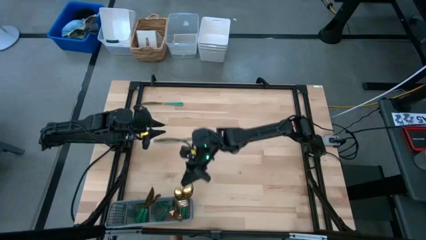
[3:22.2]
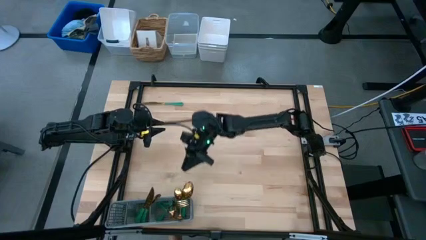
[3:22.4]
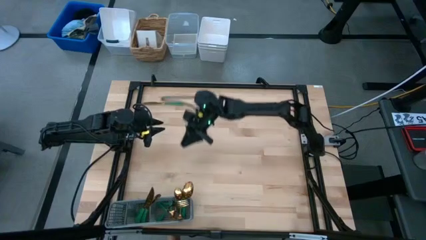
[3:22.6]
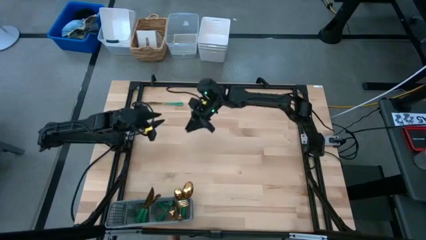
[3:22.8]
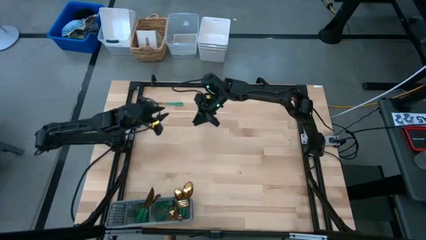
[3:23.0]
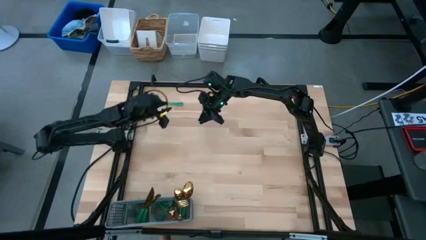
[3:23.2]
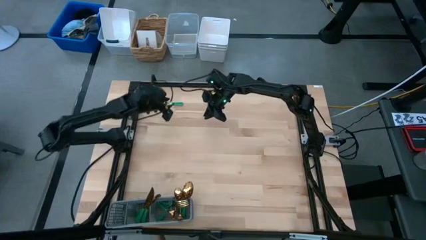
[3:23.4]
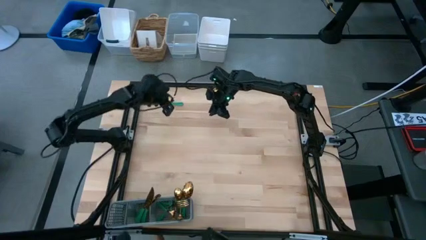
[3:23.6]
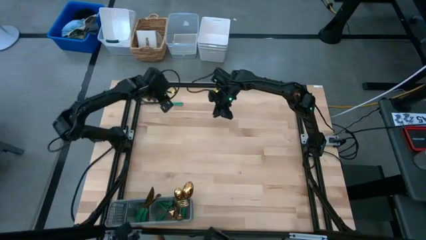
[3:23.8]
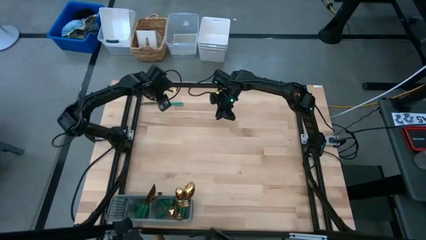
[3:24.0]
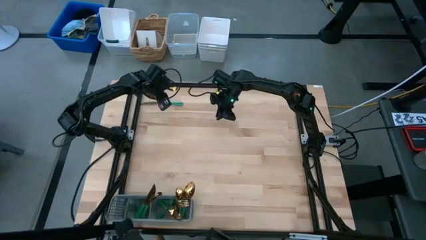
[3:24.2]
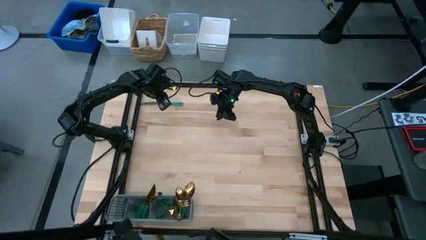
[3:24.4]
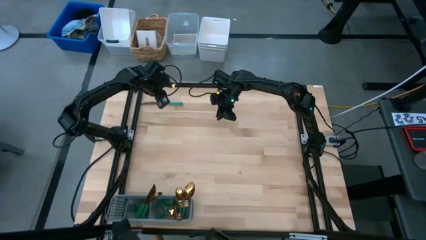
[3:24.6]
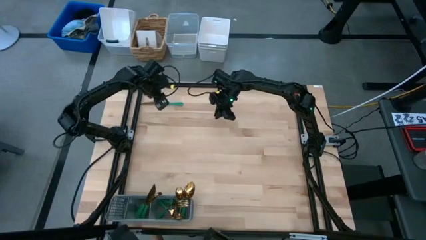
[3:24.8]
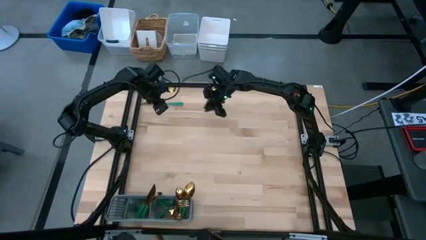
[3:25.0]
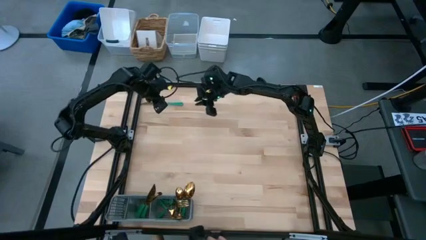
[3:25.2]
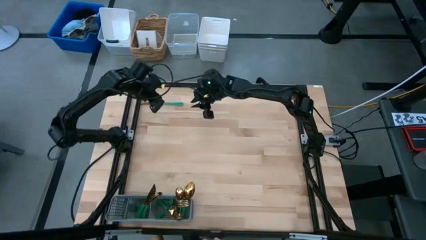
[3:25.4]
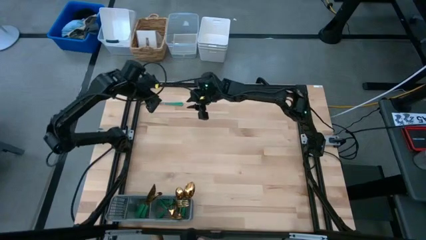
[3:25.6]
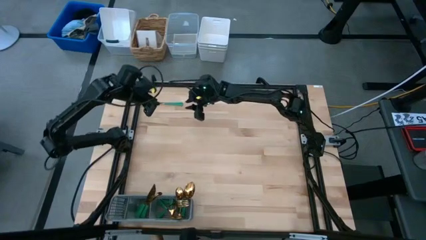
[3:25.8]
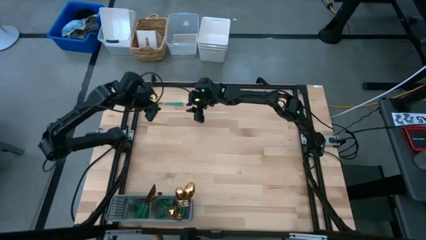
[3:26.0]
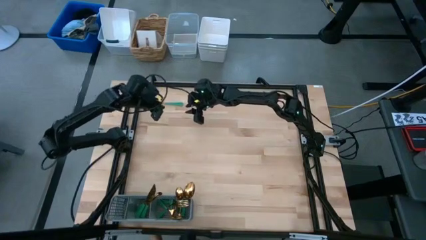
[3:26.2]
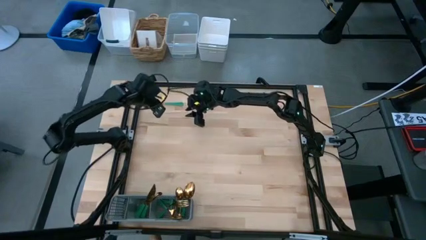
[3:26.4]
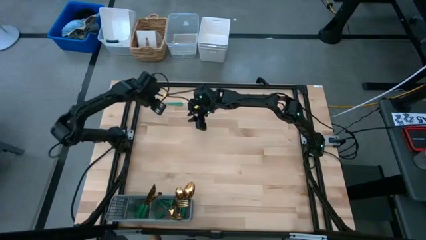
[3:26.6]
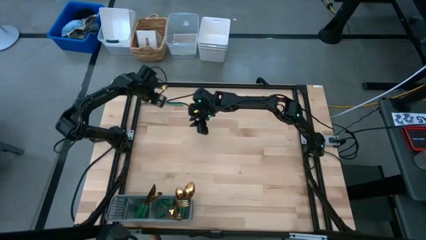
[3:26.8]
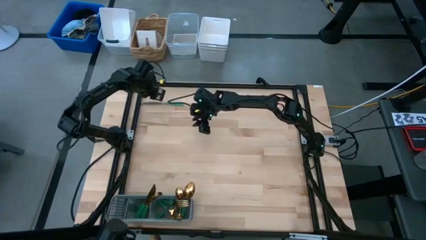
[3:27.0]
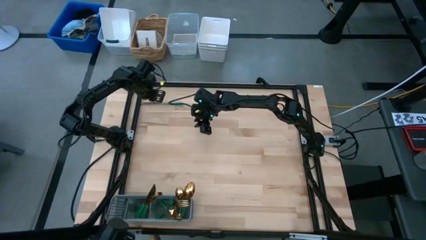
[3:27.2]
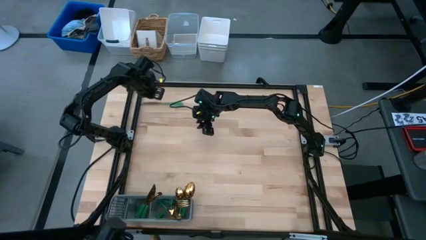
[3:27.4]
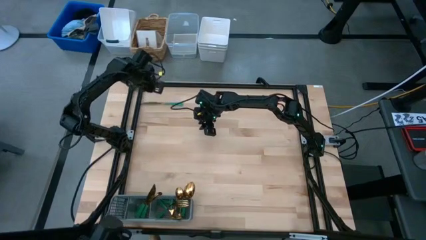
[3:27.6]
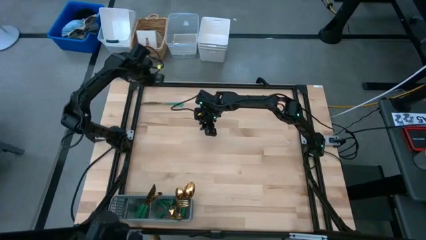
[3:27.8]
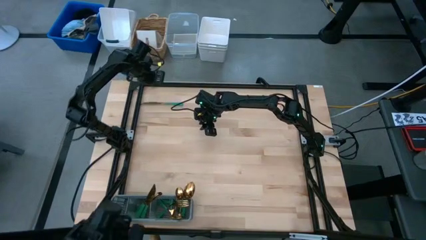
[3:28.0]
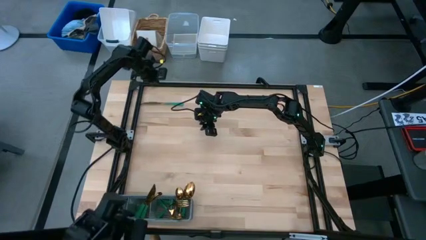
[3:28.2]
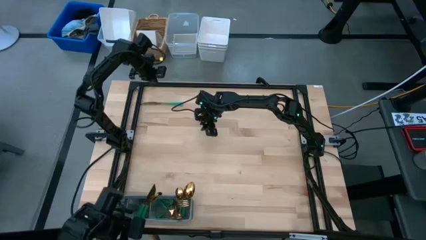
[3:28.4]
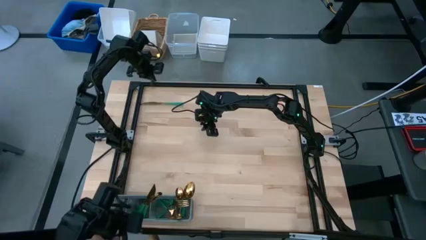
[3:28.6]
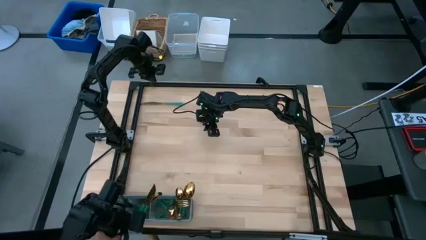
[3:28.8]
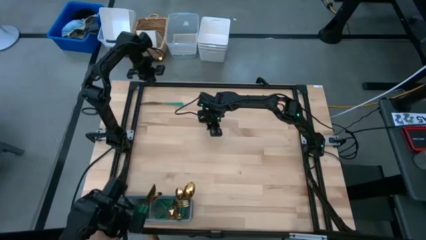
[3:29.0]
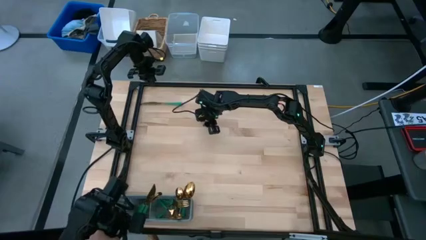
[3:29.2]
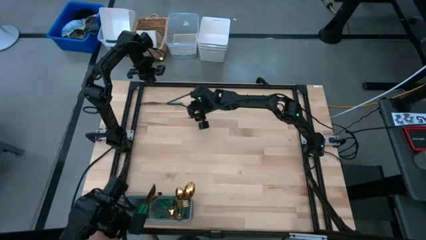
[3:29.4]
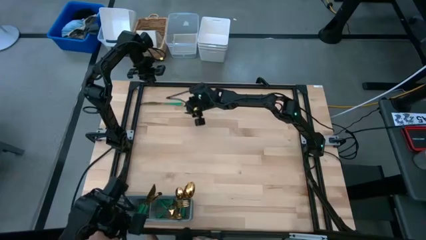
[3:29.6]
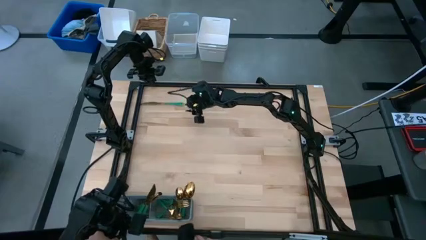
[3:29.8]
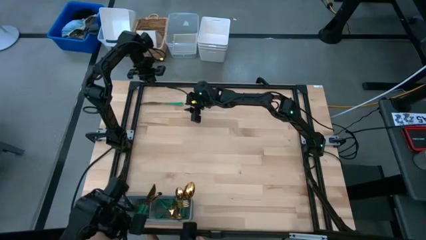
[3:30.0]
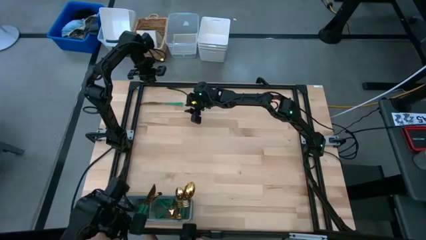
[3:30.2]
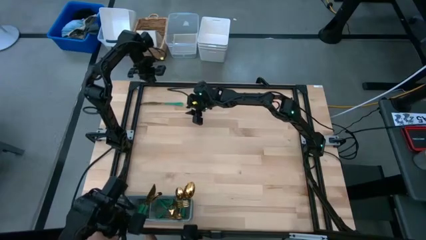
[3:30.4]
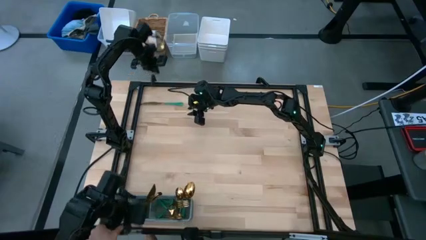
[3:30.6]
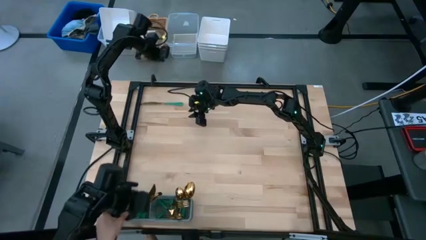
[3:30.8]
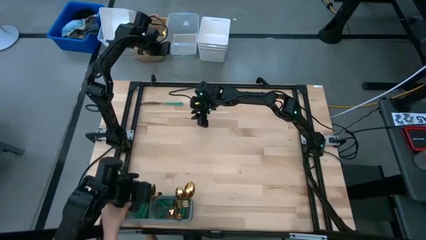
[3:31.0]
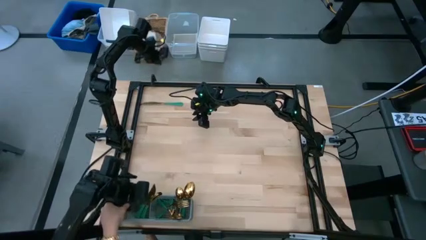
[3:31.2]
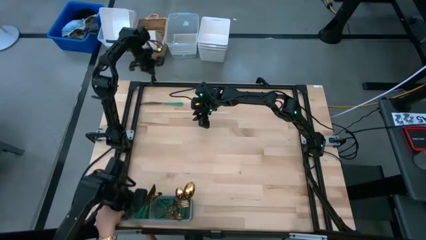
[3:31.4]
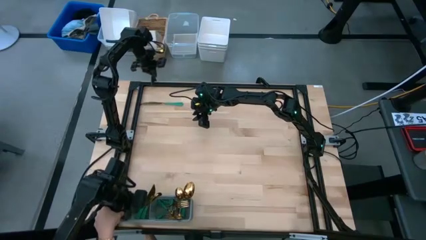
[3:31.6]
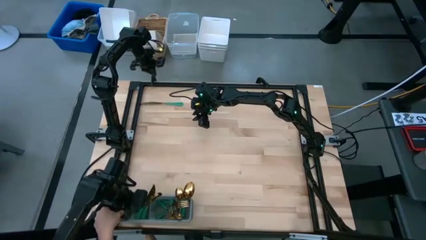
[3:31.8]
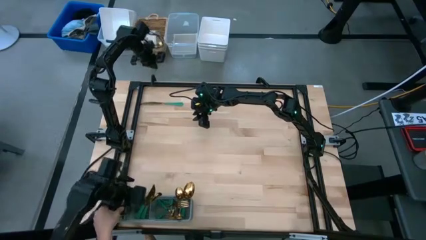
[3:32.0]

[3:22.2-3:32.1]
Task: Sort silverware
Move the cutlery rack to the center of the table

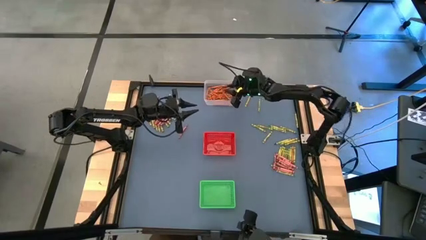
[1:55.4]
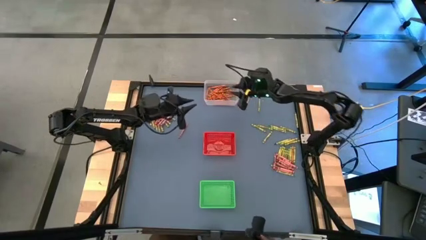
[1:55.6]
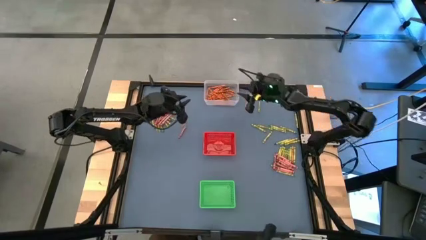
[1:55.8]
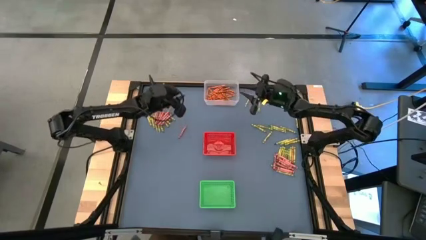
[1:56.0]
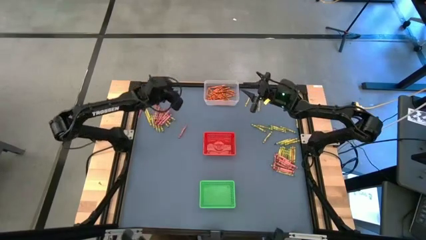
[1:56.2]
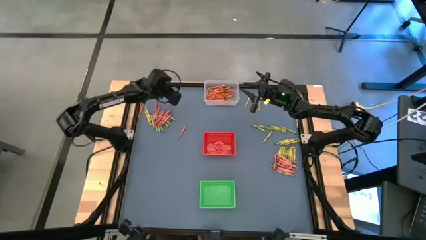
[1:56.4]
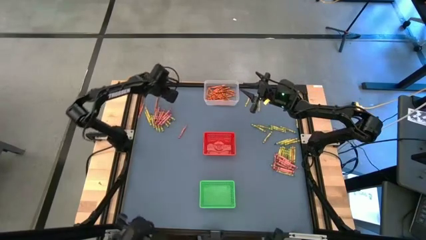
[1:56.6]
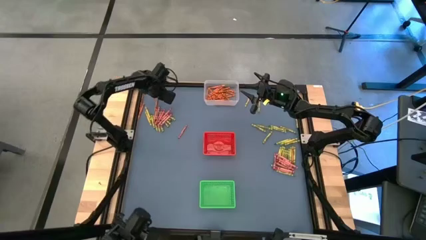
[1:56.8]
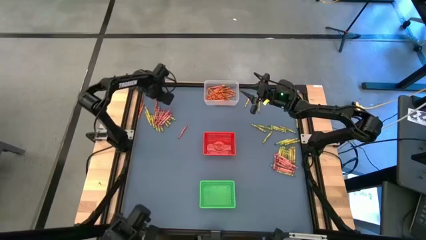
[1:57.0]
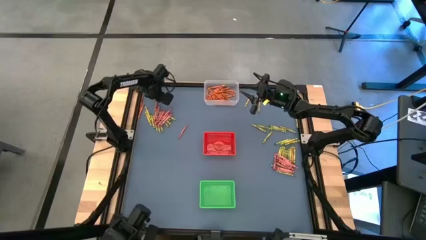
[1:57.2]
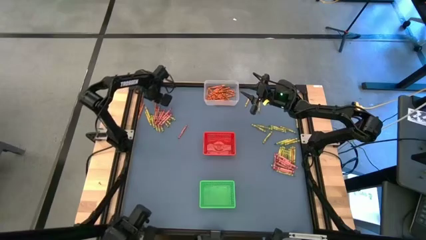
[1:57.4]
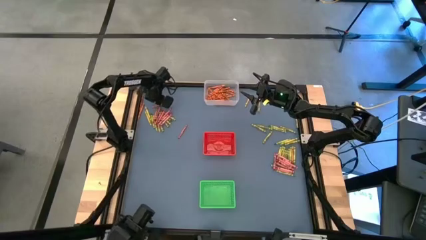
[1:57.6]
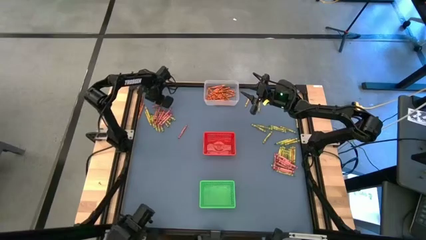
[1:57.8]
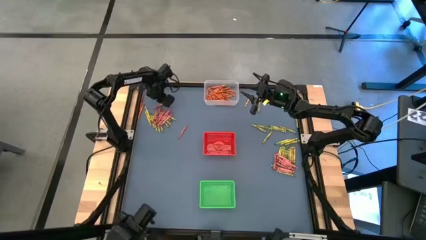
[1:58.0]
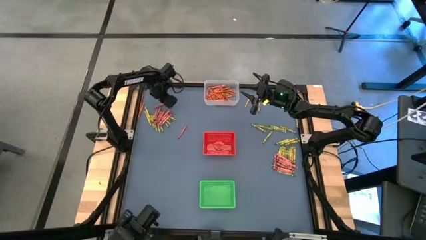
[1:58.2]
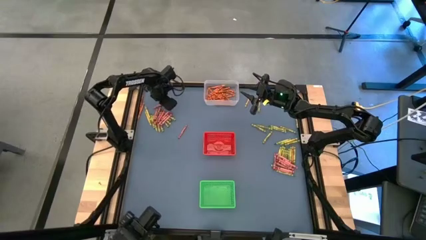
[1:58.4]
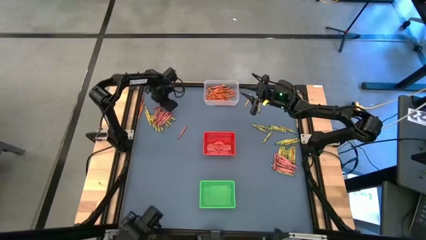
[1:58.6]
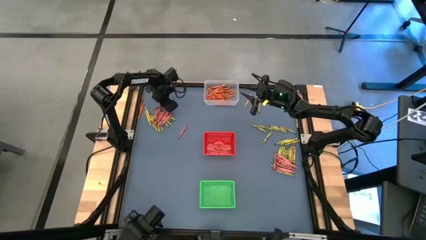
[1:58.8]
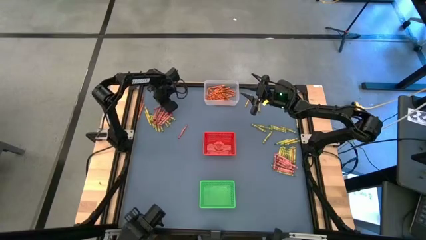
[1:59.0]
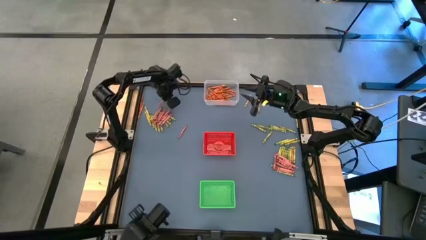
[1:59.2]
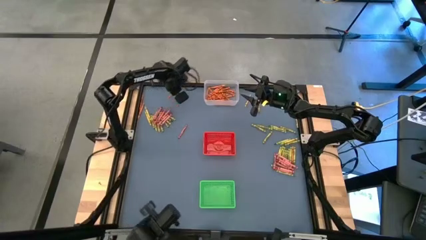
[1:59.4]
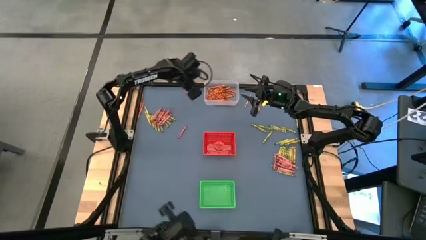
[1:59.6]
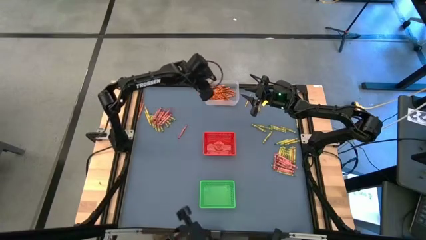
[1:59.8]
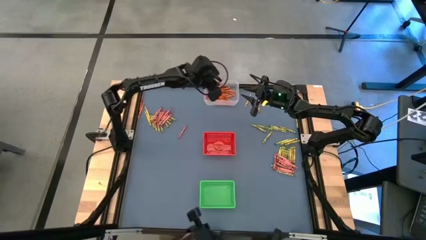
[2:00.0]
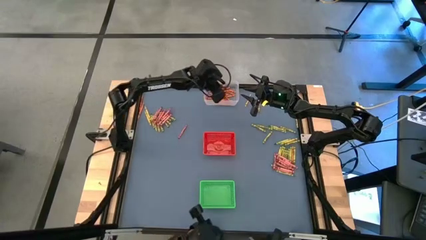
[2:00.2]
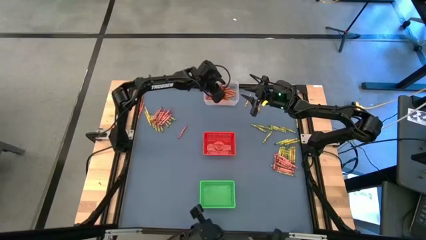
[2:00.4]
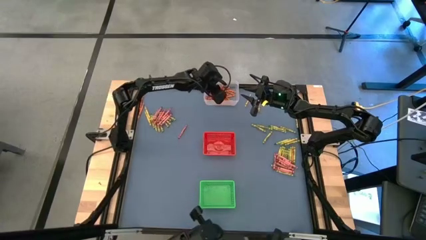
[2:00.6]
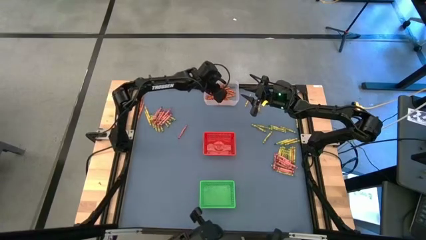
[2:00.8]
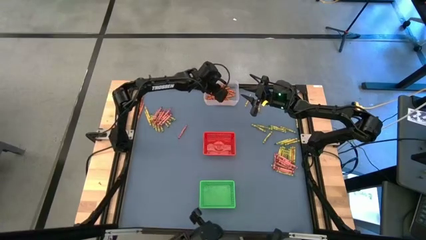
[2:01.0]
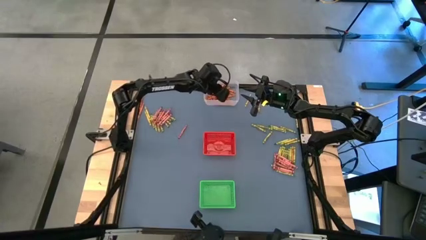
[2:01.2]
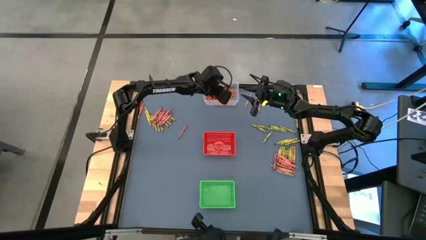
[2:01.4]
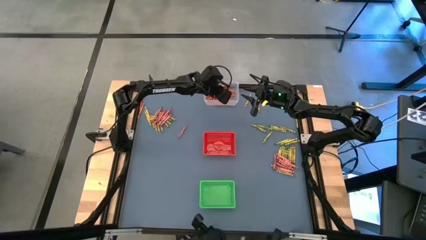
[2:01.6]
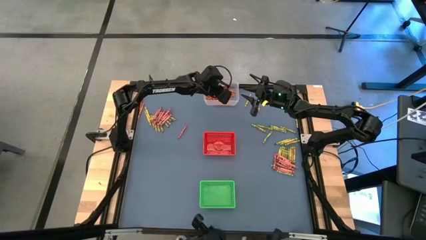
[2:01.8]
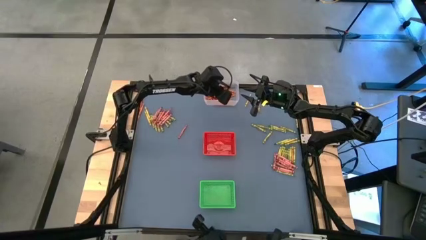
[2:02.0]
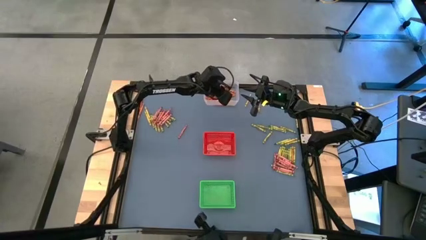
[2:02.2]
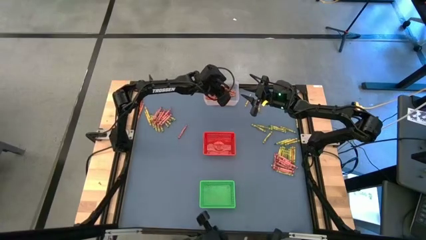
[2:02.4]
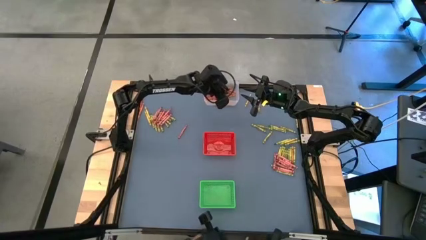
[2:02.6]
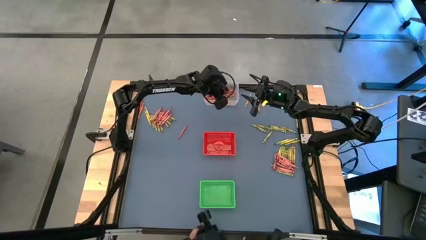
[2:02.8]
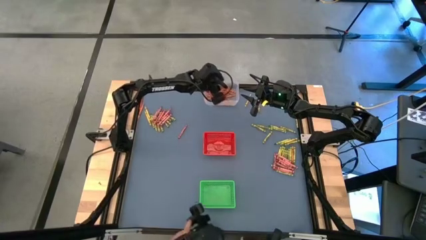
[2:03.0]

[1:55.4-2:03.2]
Task: Sort crayons
Put the orange crayon into the transparent bin
